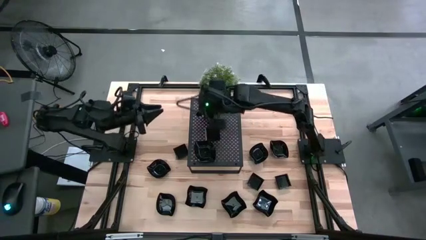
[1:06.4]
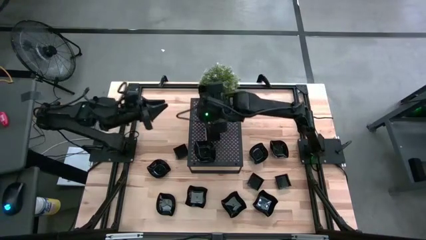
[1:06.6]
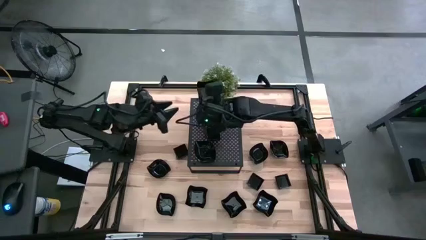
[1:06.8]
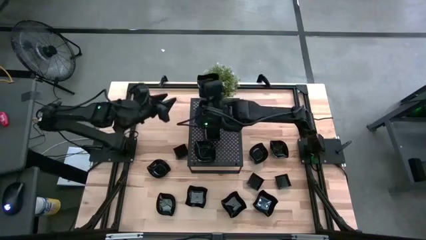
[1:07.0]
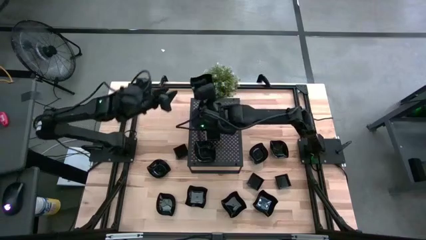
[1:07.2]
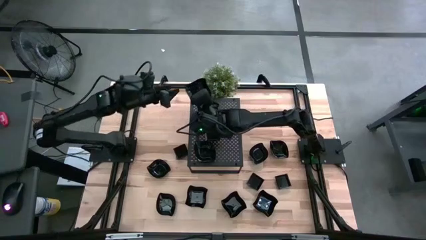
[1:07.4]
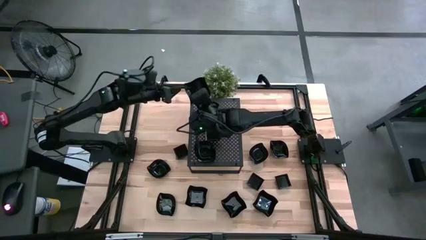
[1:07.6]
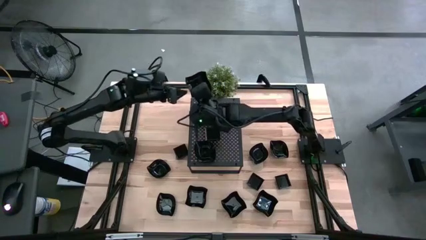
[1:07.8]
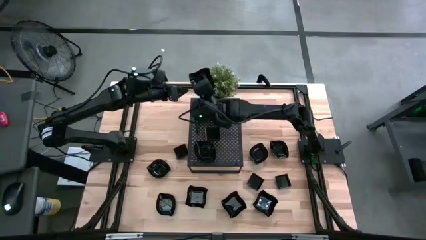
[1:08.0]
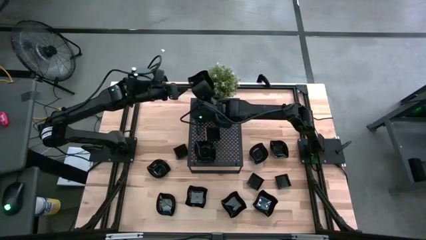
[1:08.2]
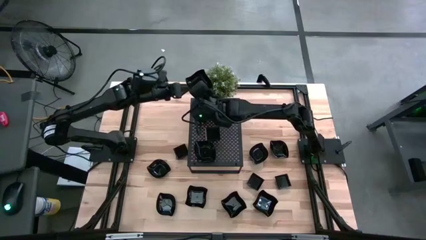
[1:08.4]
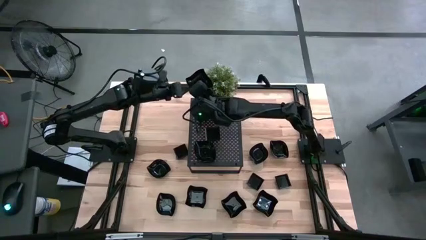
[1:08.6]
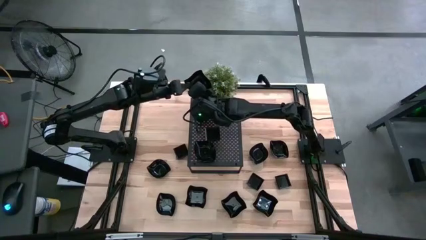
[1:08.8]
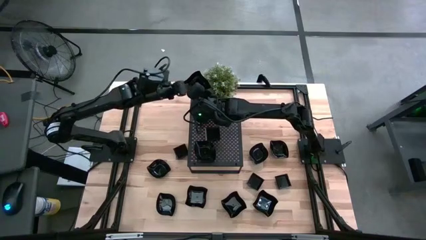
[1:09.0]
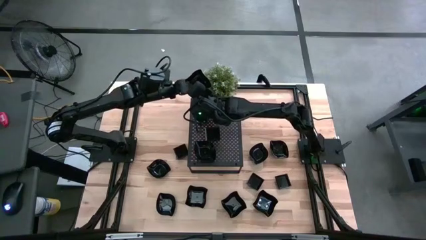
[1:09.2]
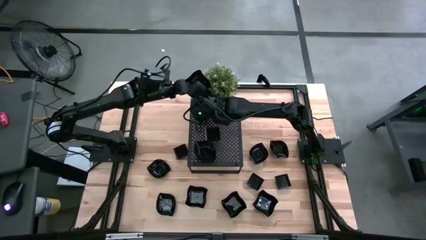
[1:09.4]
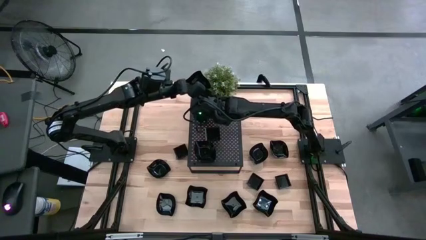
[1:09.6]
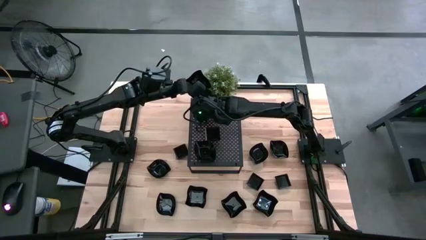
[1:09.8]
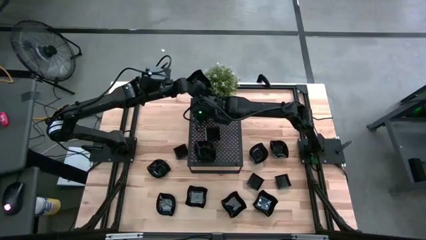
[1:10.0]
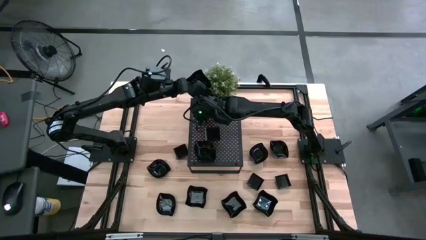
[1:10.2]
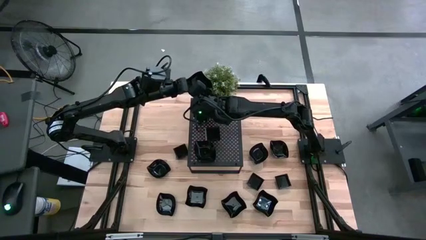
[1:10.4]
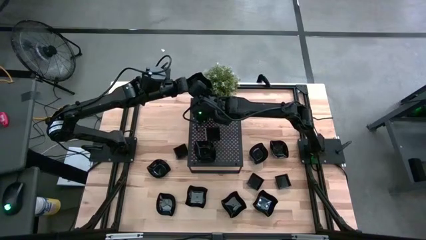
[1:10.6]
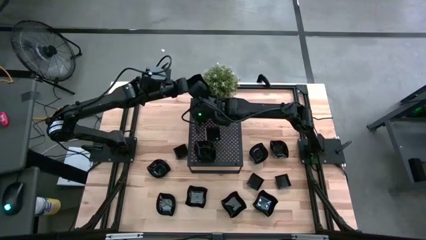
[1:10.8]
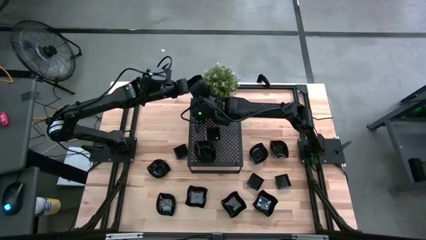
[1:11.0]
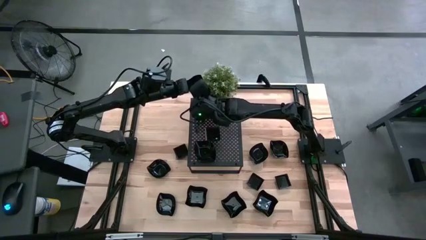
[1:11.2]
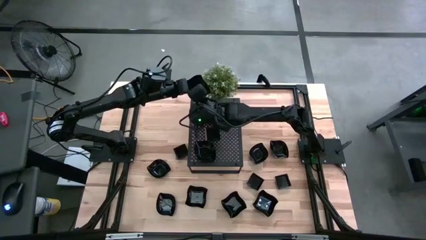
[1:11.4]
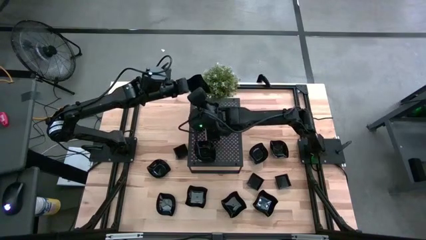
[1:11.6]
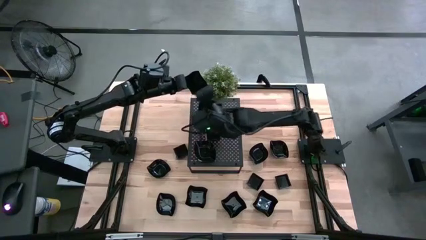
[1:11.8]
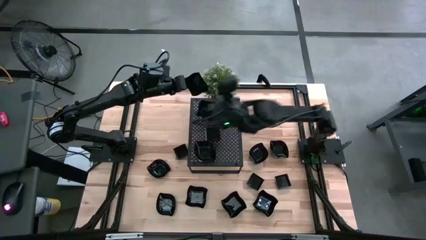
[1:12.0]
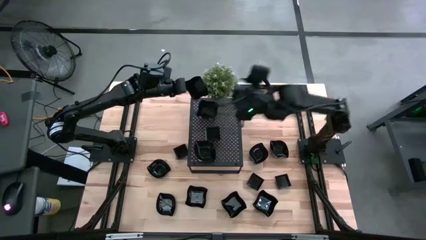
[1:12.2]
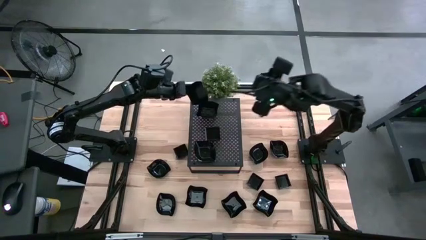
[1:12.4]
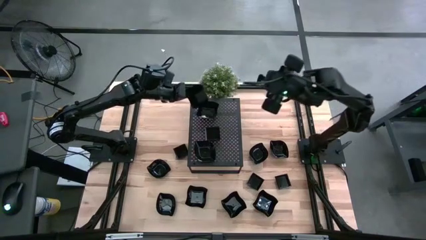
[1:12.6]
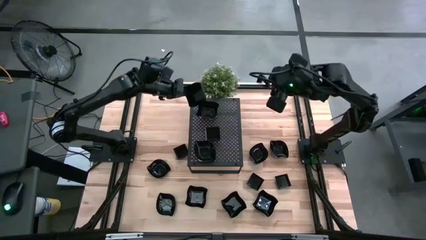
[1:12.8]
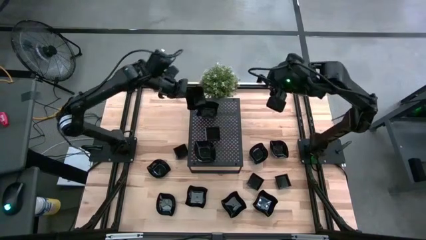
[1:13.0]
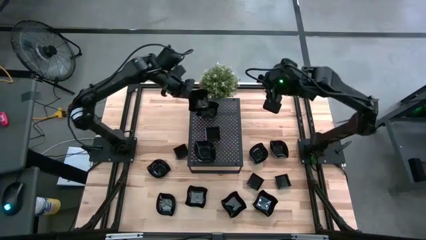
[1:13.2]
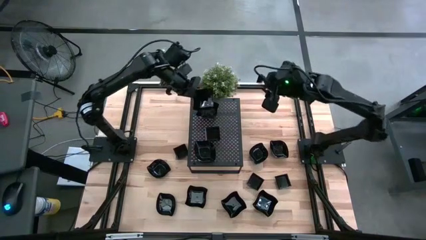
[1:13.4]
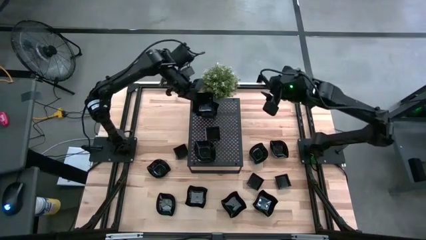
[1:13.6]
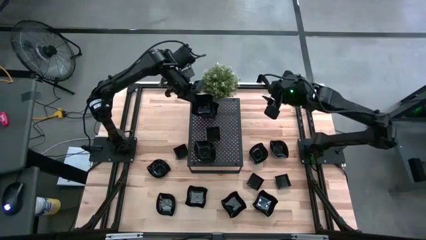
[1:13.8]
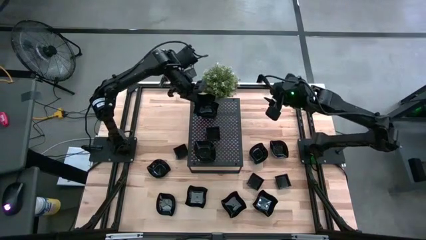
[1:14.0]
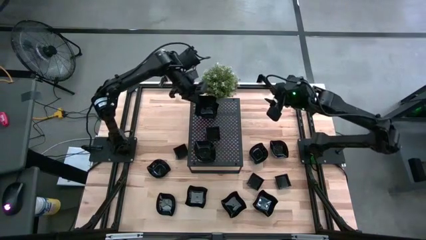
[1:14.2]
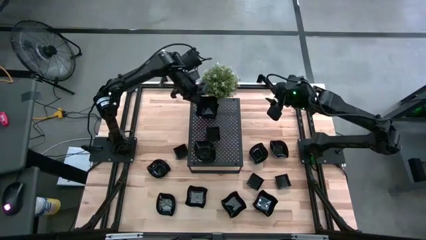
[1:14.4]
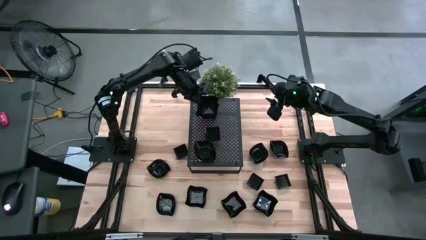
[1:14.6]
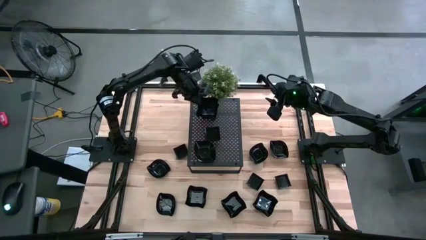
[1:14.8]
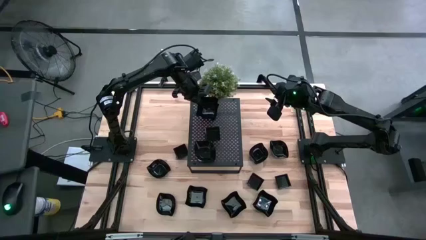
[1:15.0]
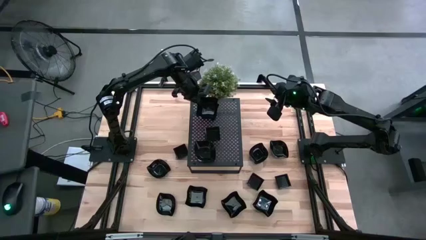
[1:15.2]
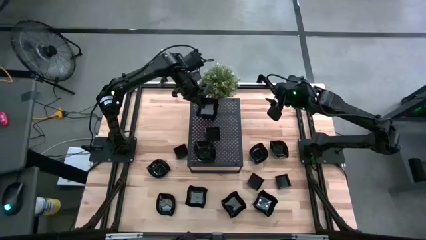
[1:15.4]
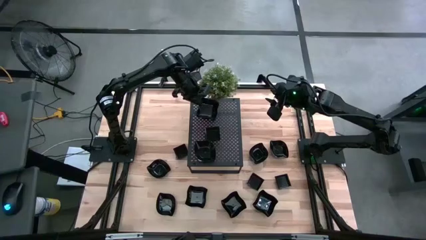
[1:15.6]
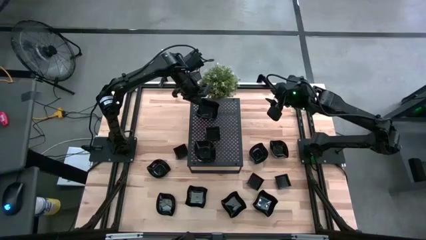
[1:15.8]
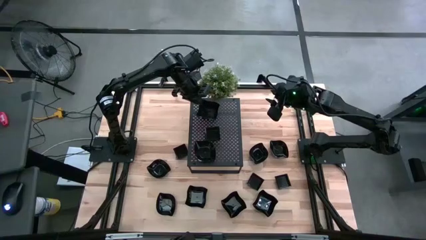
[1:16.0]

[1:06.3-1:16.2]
Task: Pick & Place Mini shaped plates
Stack the distorted square plate on top of the distorted square plate on the shelf

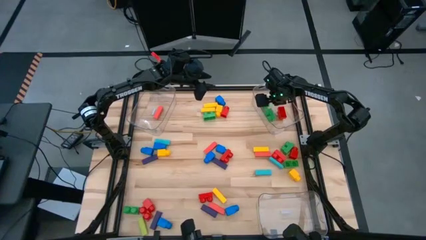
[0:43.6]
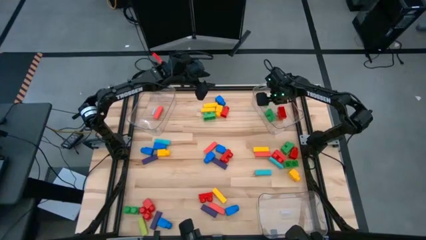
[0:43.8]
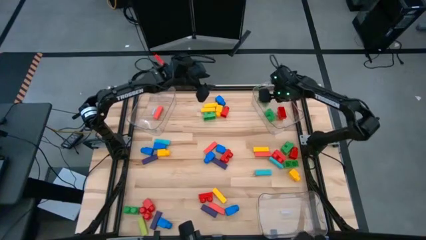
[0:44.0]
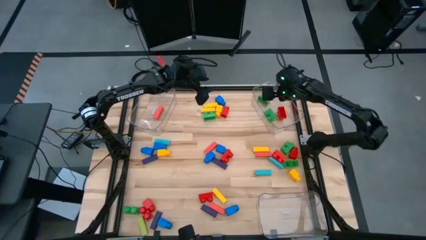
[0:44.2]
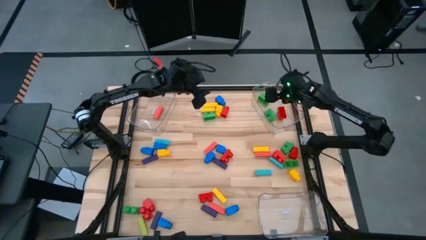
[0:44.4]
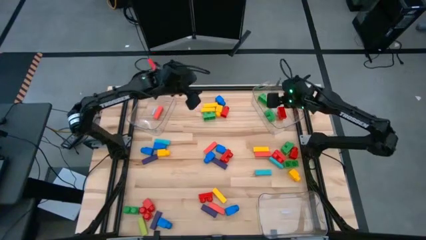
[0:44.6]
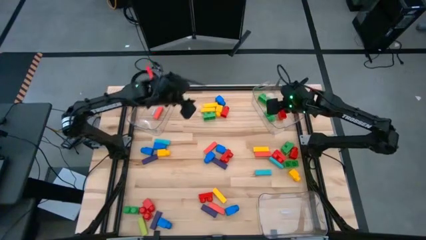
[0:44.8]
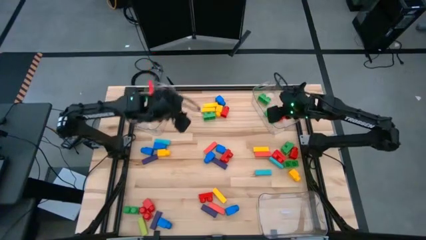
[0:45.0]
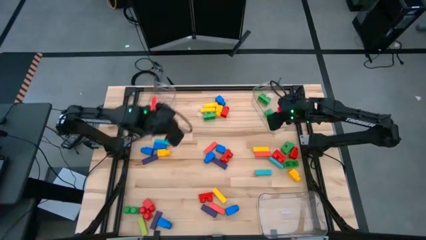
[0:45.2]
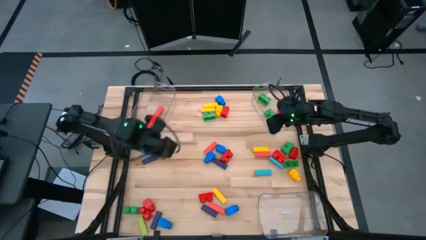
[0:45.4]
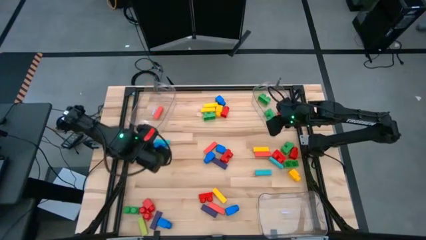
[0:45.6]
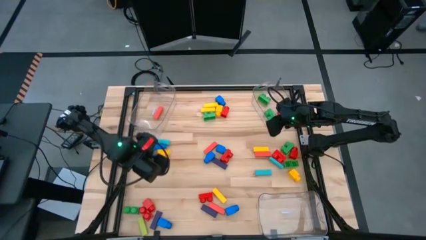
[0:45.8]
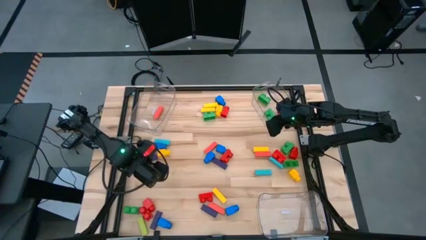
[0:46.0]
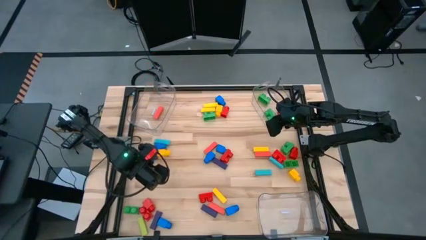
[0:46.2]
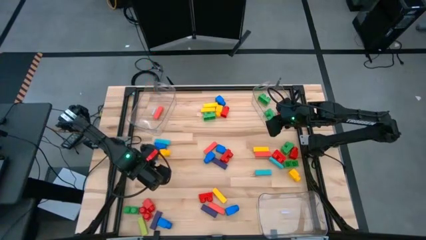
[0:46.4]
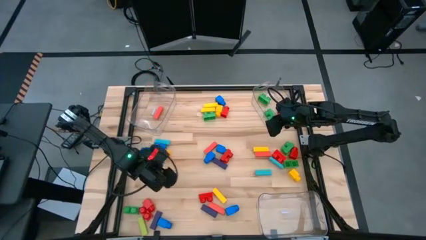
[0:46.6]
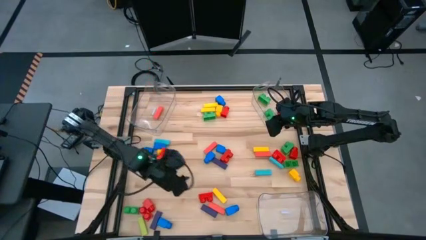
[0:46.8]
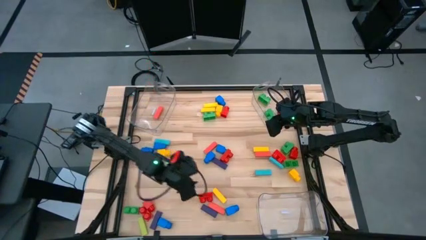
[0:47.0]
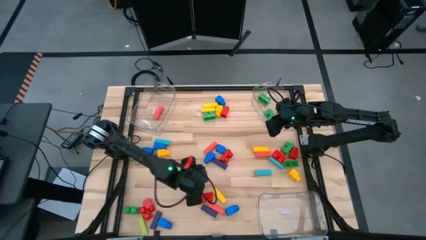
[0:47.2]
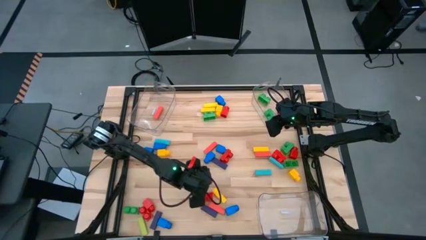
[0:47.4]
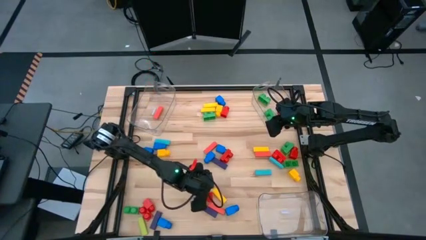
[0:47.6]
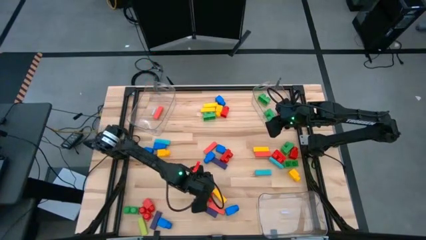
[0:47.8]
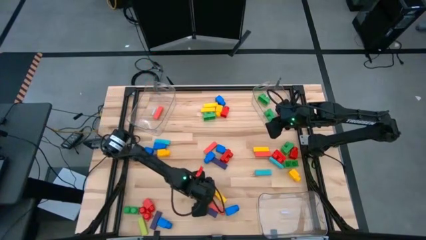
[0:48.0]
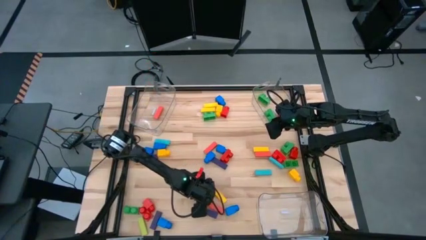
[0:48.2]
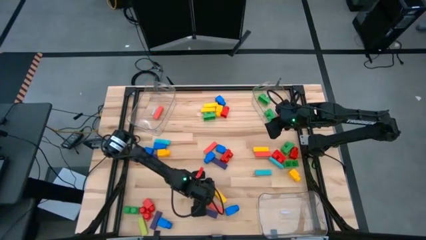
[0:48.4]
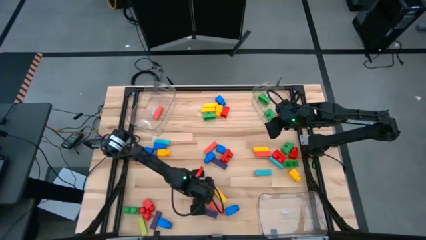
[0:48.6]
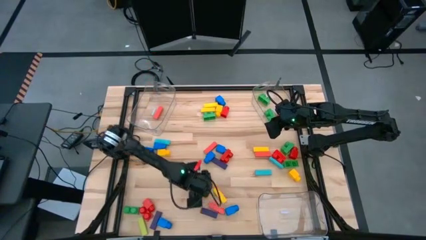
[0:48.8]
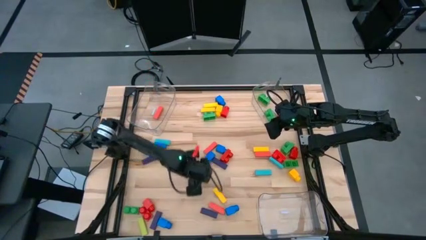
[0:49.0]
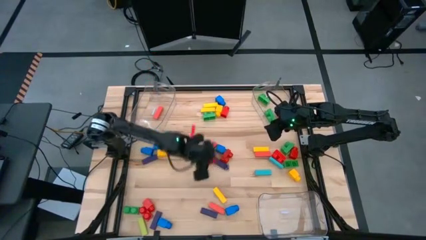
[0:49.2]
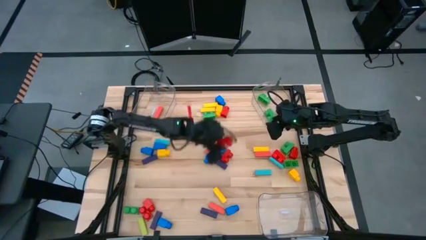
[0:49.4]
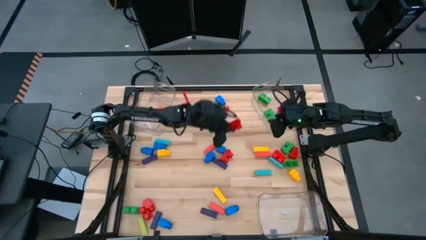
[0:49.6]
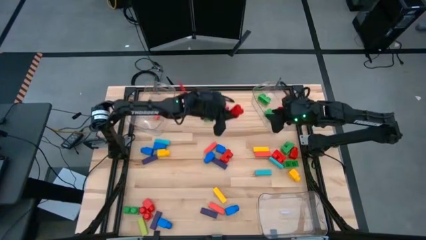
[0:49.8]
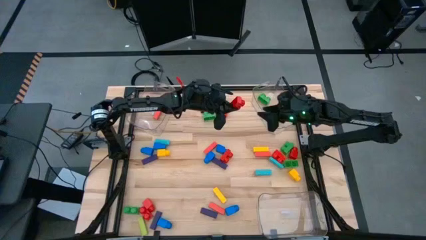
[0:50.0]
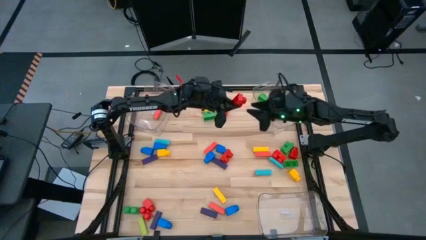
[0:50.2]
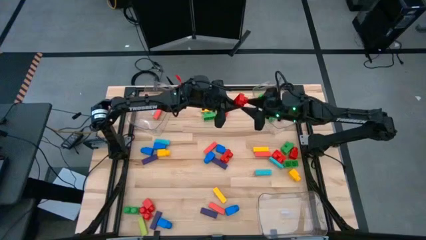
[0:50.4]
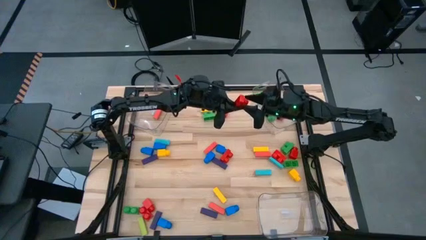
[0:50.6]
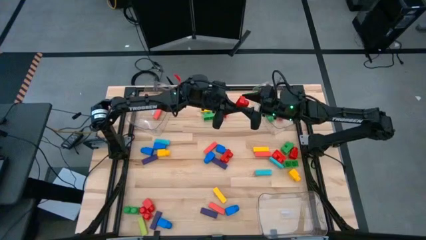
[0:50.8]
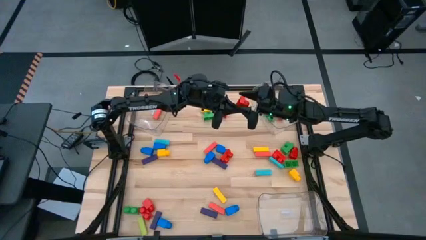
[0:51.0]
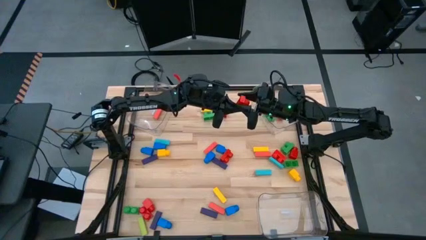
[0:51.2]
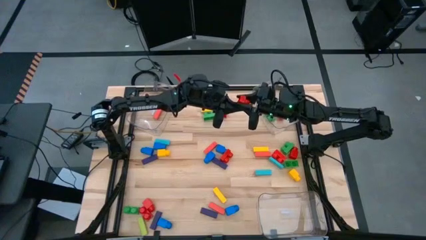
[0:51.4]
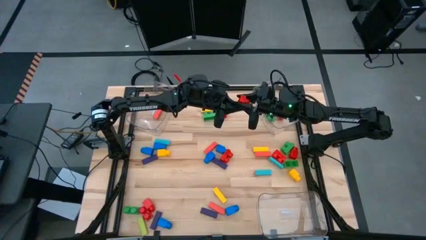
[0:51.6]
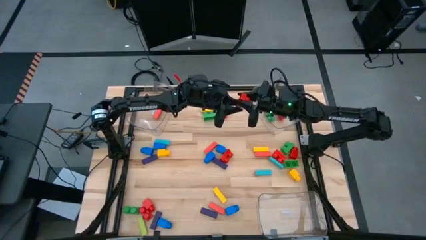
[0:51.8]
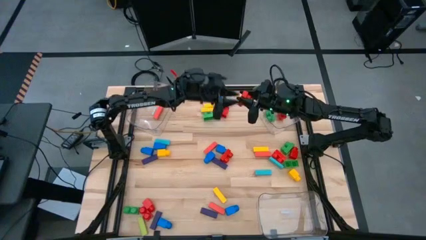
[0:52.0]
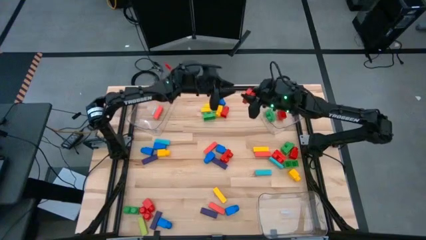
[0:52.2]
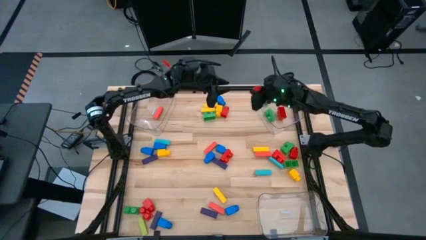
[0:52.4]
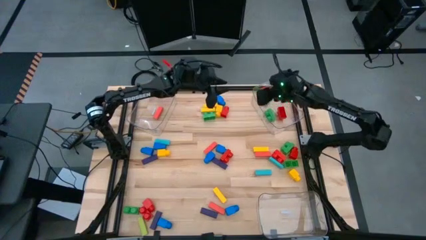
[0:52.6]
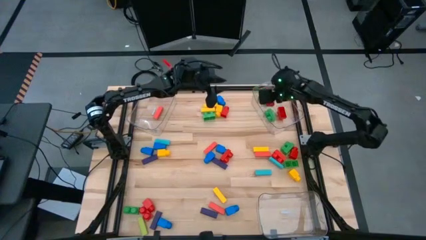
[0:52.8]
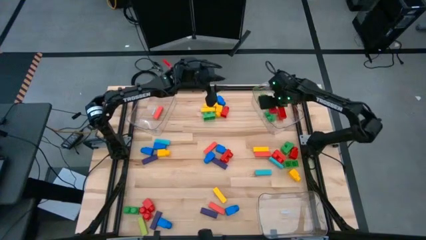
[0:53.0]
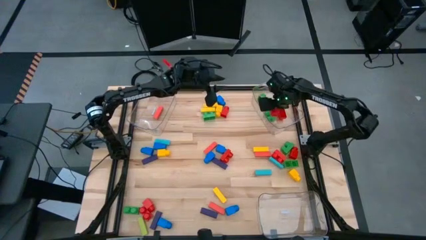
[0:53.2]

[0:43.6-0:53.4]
Task: Sort blocks by size
Put the red 2 stud game piece into the top right transparent bin
